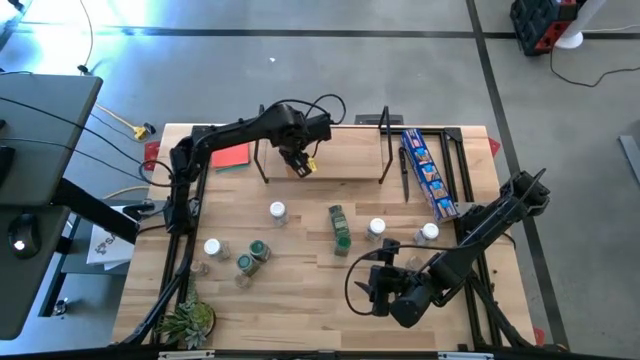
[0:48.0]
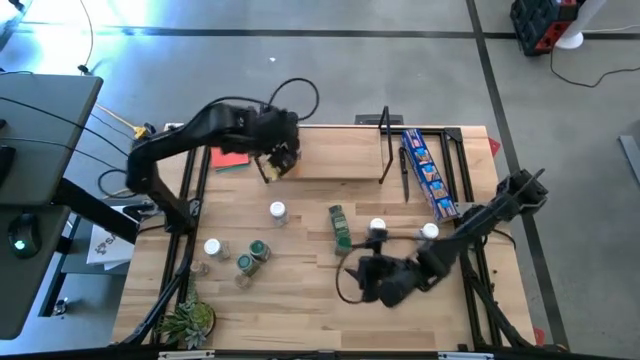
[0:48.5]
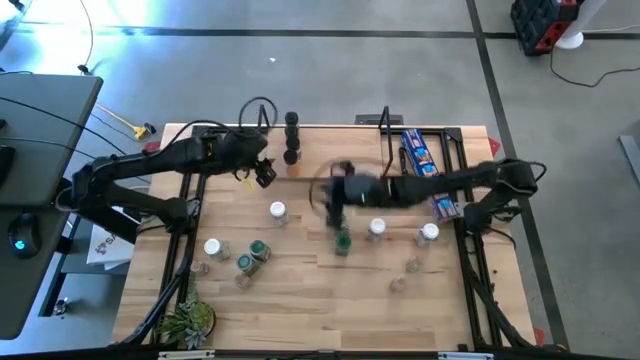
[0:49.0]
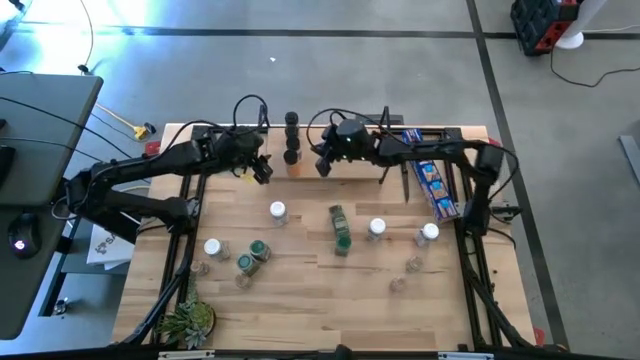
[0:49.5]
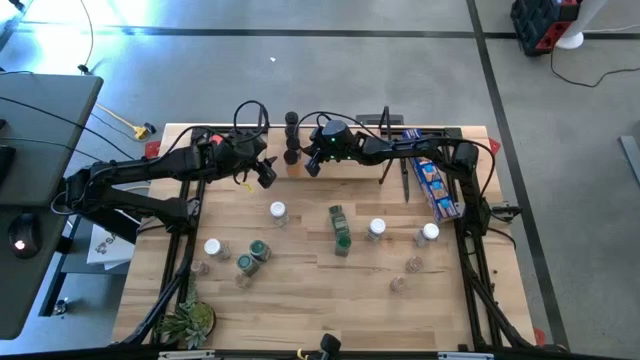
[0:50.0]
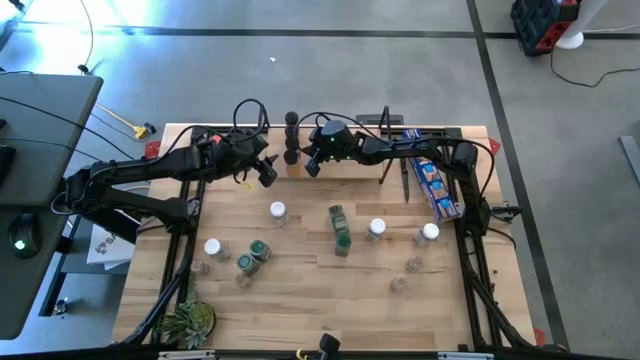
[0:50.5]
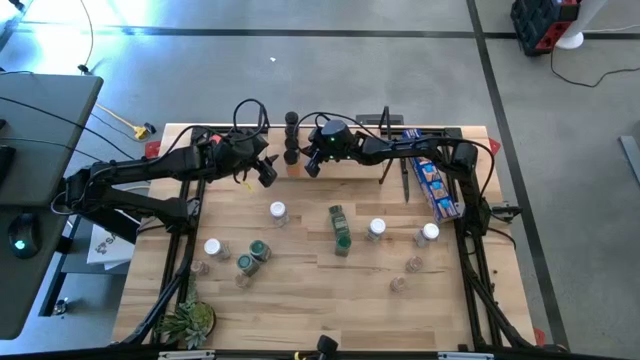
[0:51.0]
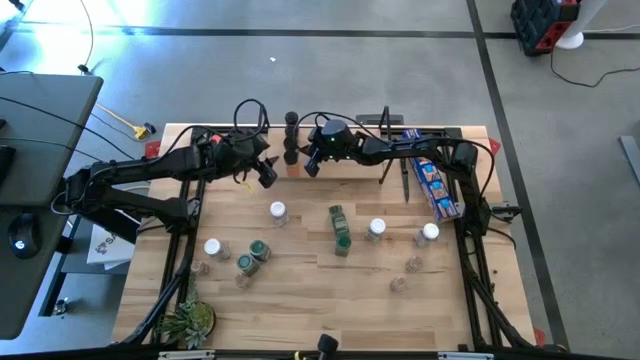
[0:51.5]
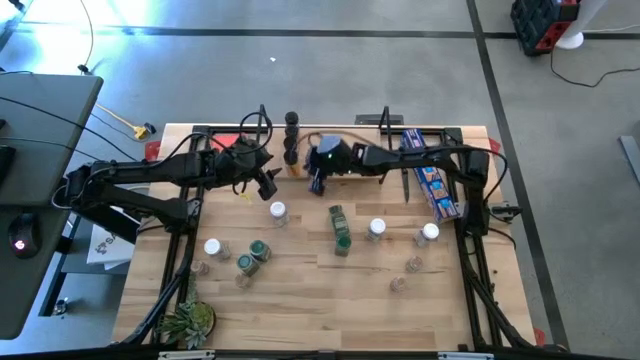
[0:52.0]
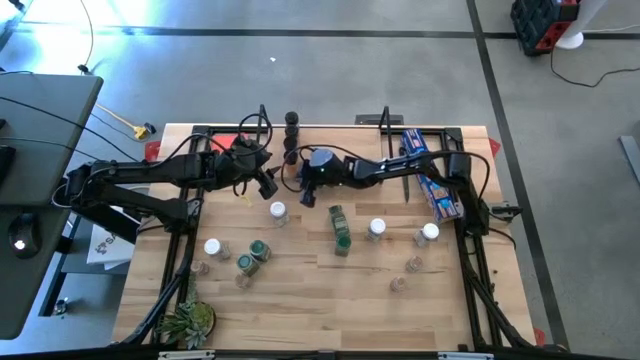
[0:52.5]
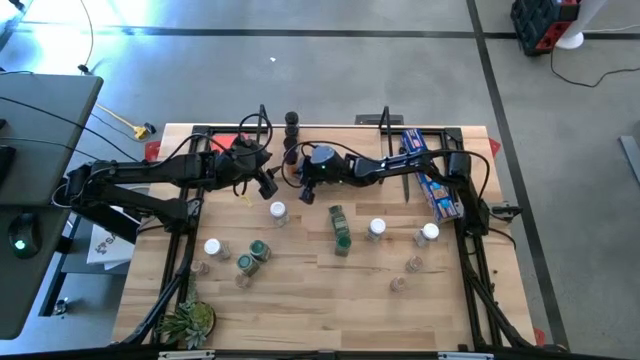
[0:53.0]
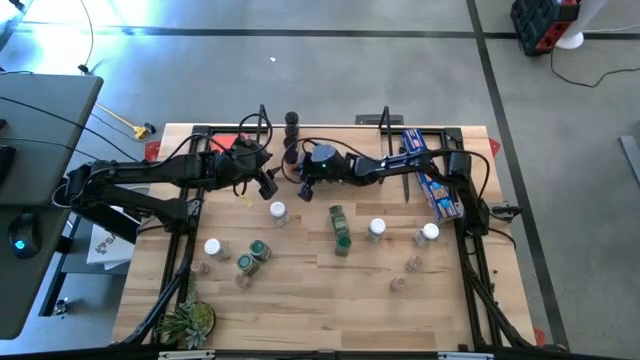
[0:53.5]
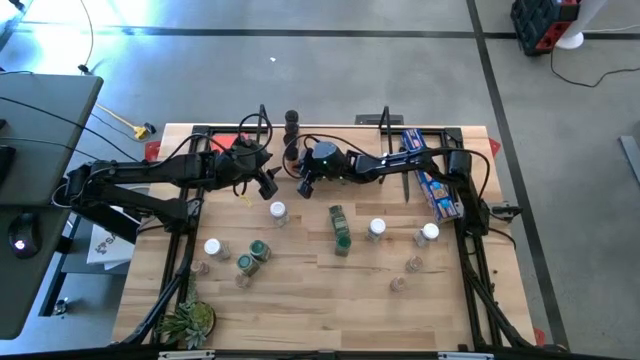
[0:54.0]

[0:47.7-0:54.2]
Task: Shelf spices
Adjust the black seasoning bottles on the shelf

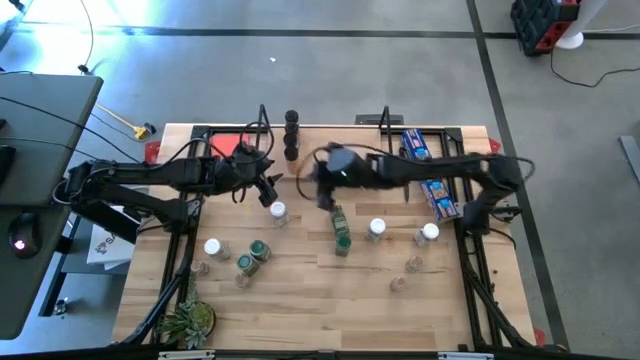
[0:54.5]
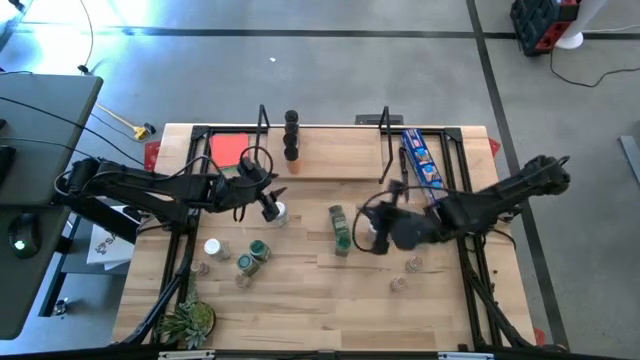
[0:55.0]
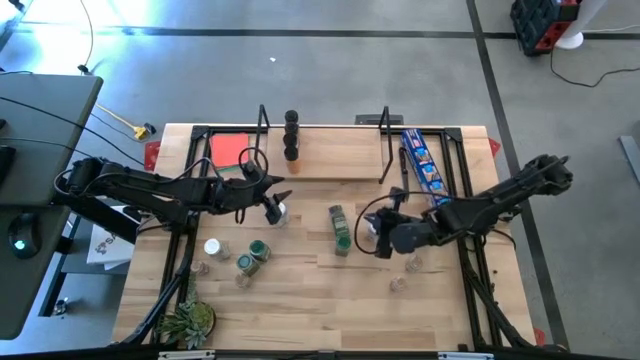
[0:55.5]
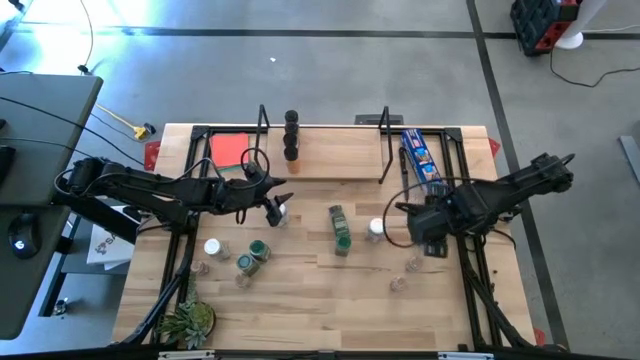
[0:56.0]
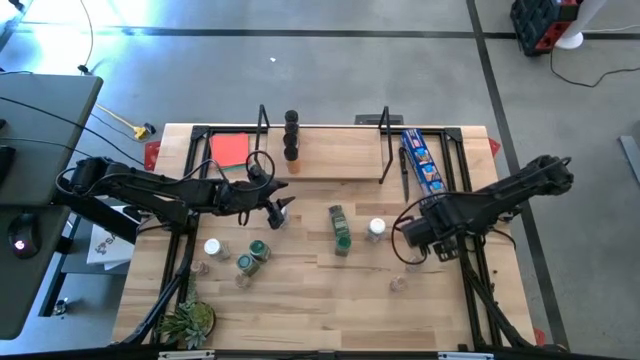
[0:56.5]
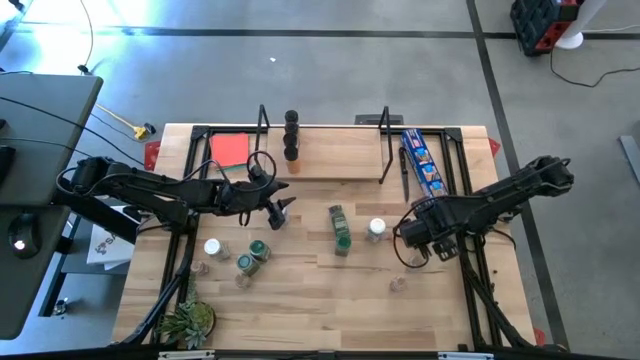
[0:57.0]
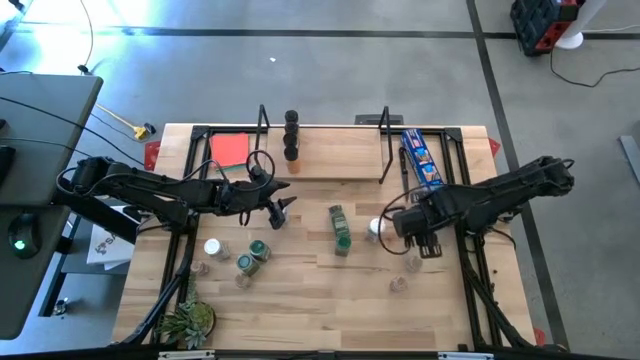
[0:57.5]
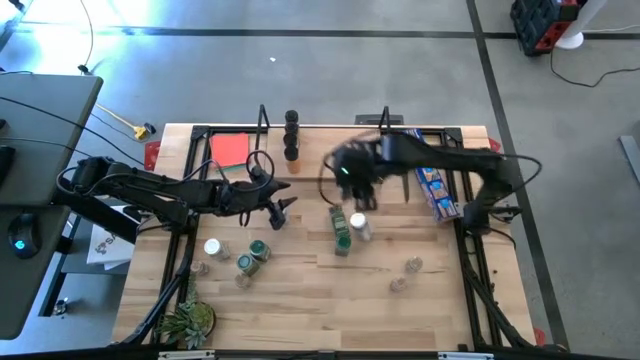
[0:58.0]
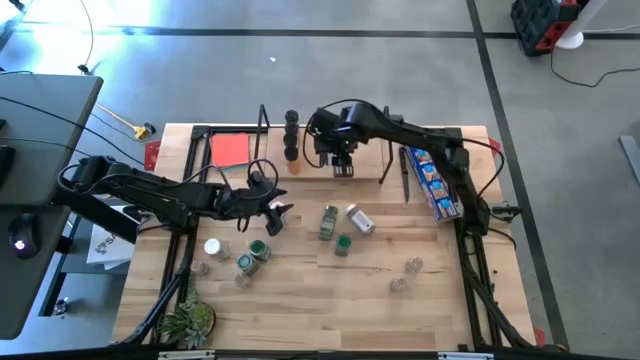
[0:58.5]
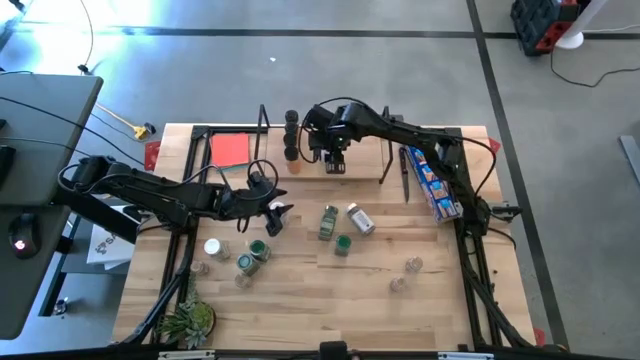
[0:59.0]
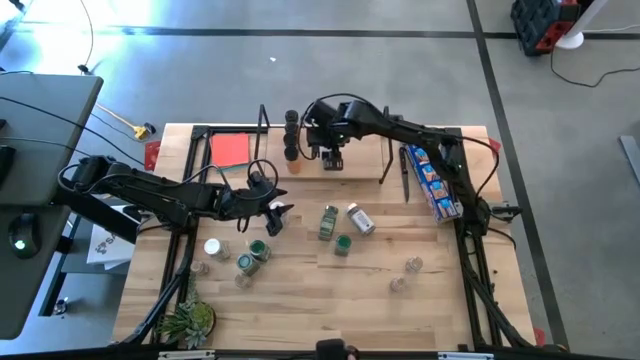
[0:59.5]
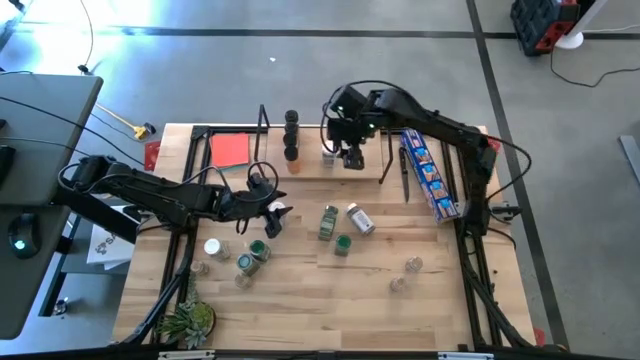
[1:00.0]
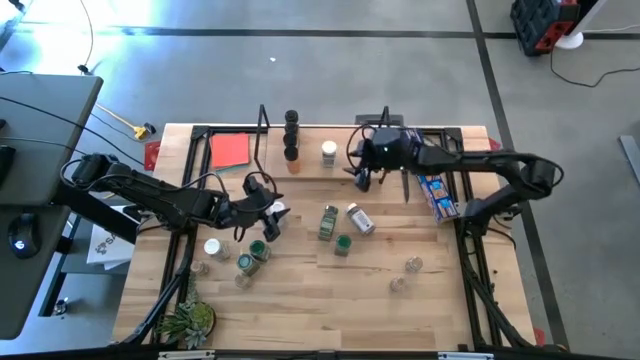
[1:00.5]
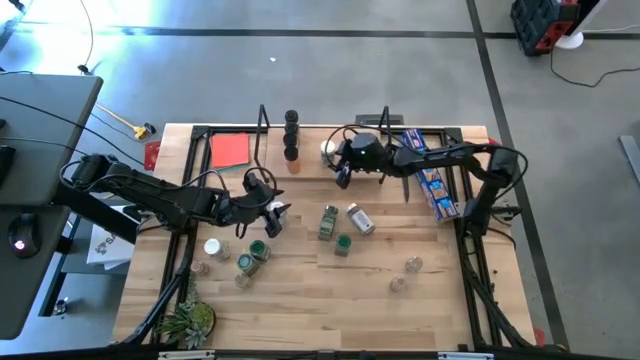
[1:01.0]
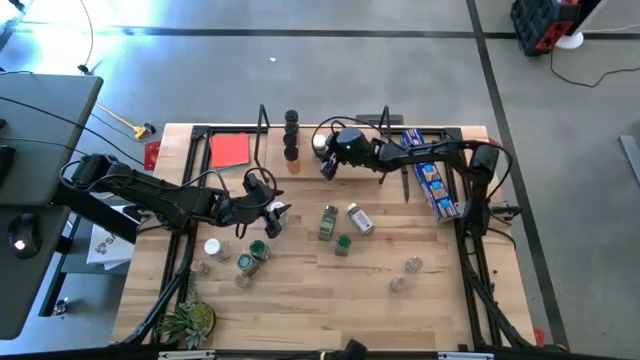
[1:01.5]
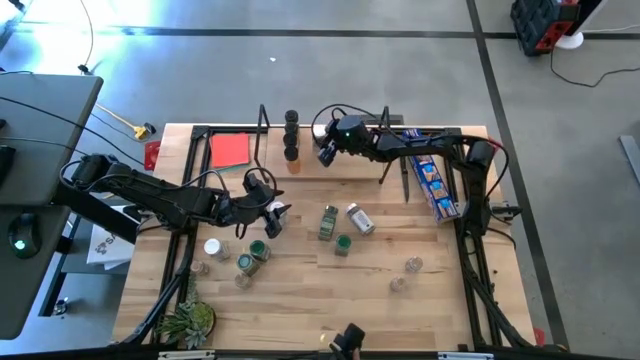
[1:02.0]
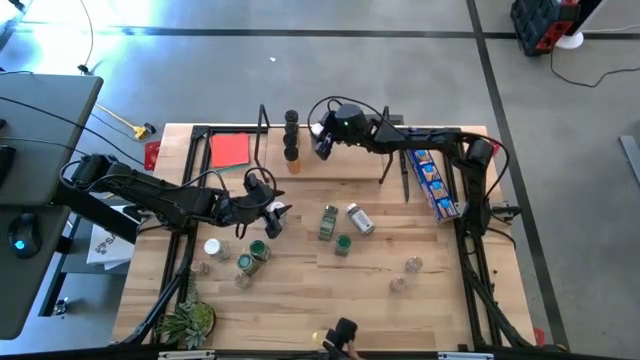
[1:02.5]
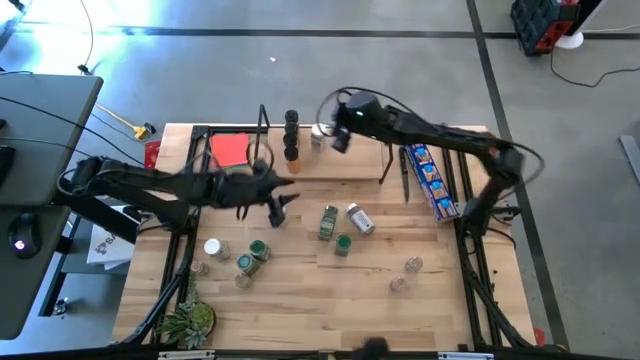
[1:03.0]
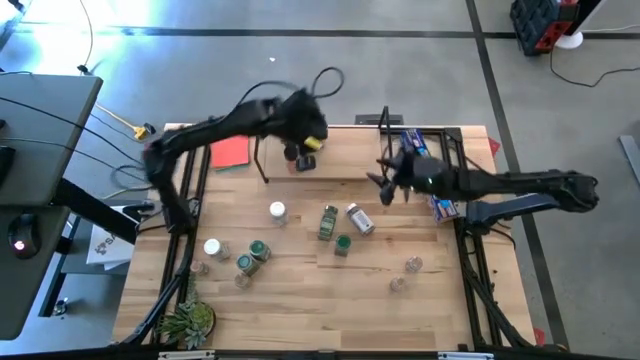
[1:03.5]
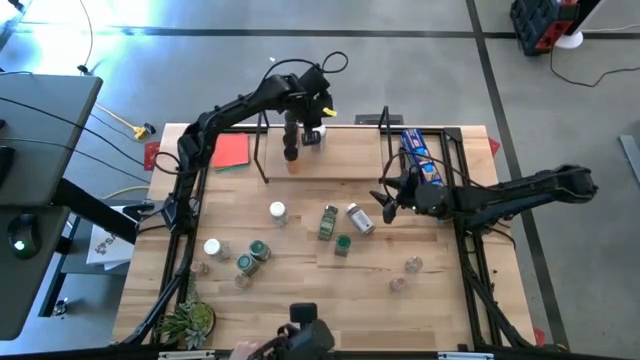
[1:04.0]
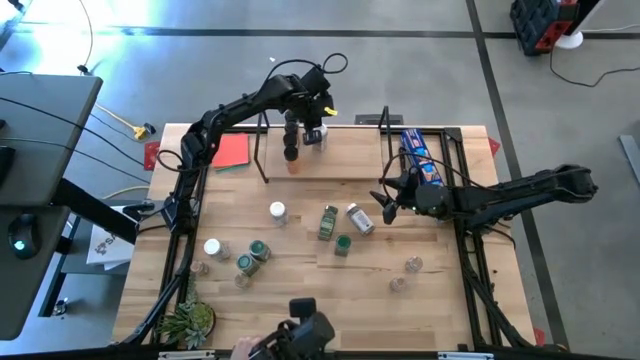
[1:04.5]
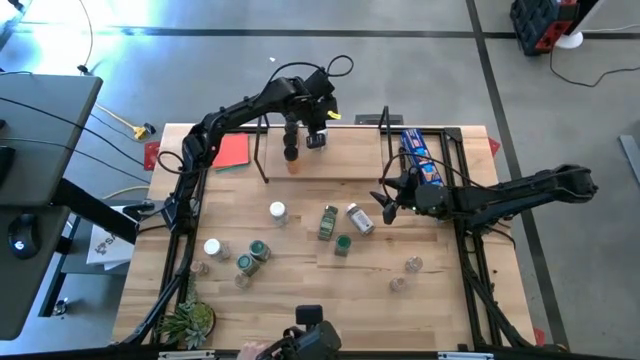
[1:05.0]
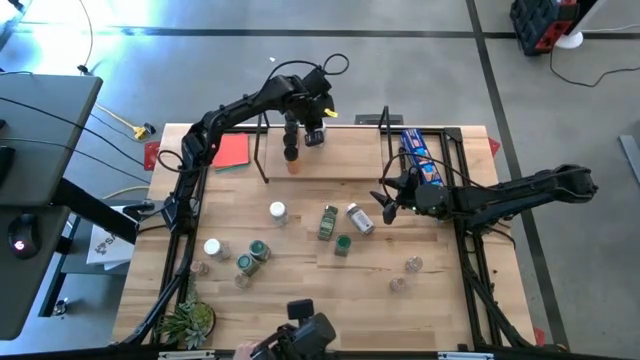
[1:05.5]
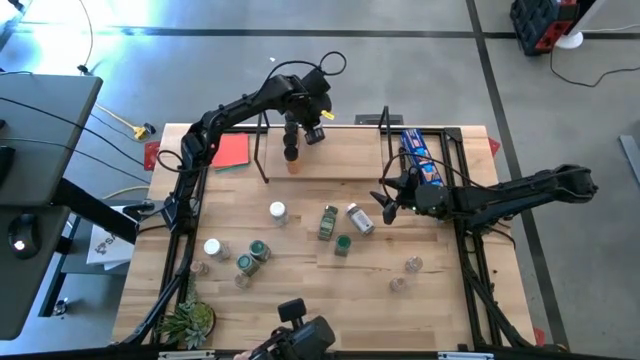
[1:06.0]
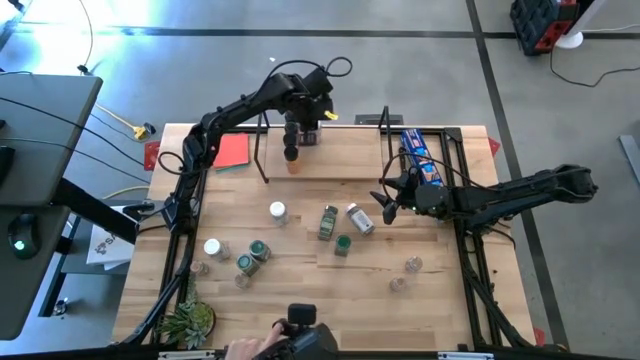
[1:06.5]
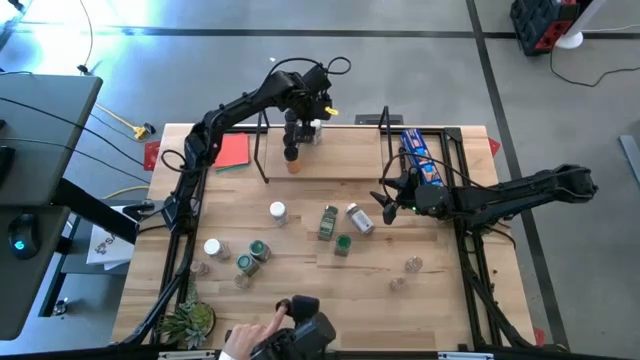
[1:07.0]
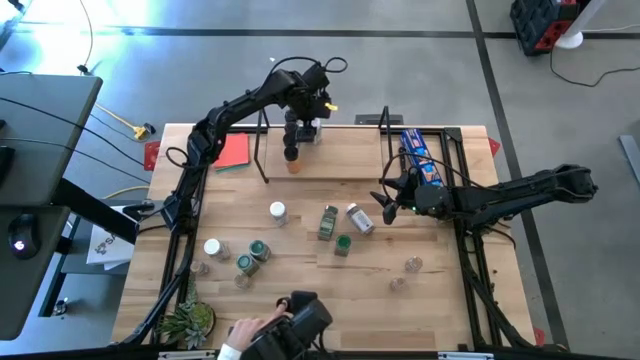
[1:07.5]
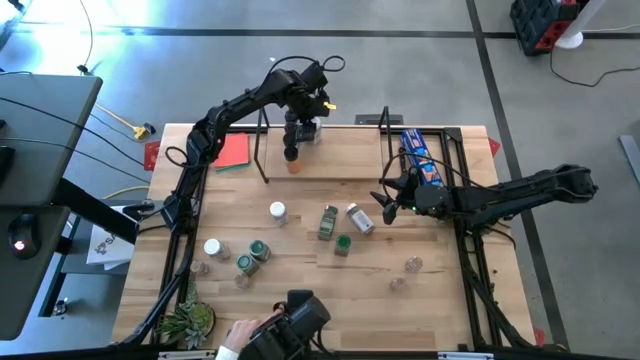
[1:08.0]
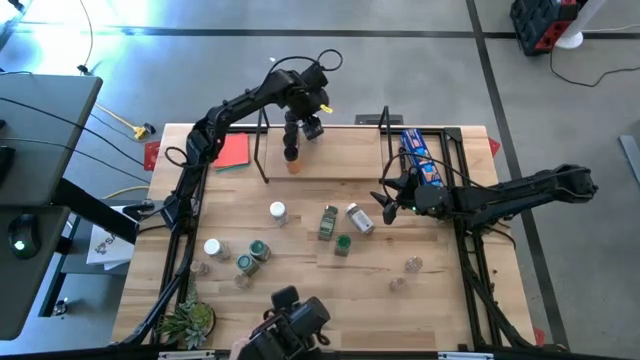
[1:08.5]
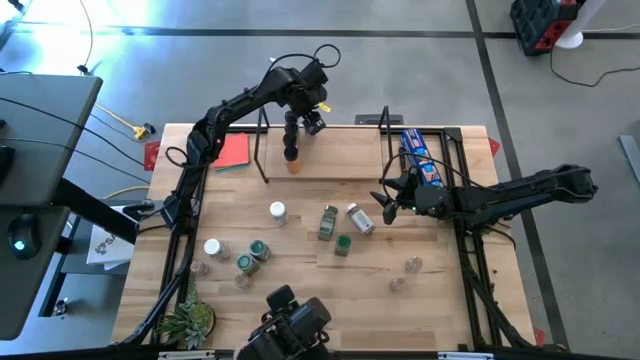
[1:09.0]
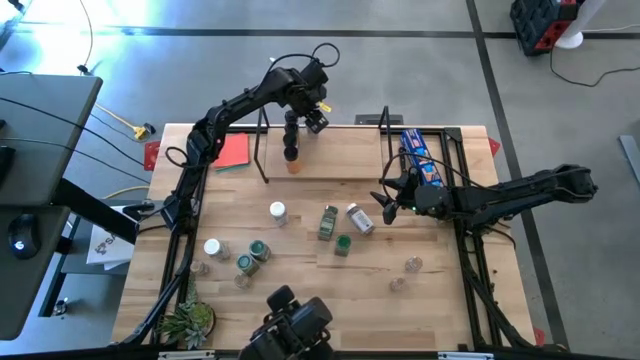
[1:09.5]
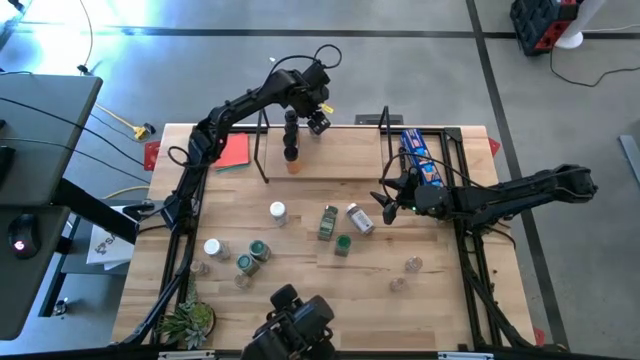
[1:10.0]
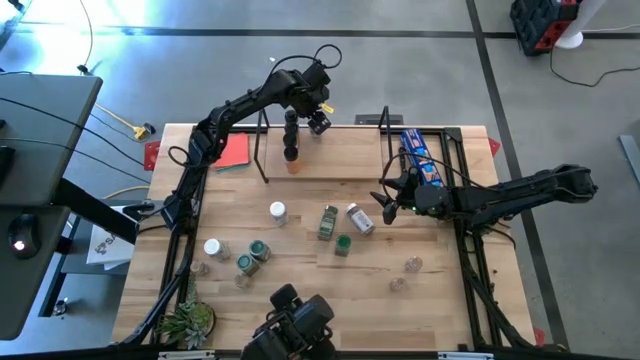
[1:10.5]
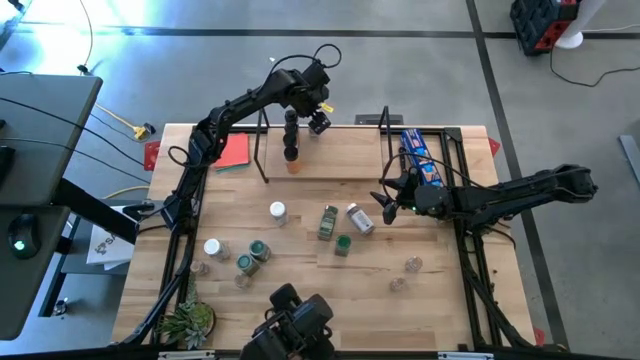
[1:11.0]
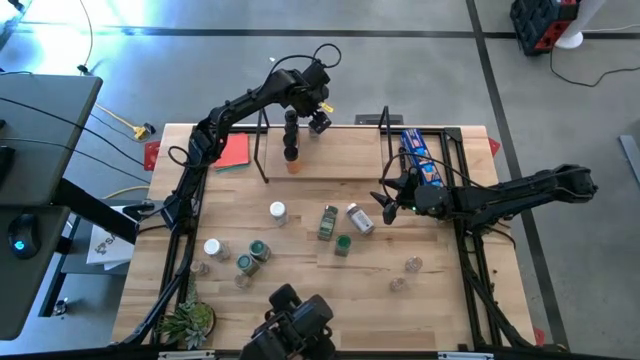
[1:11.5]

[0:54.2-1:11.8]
Put the white seasoning bottle on the shelf
